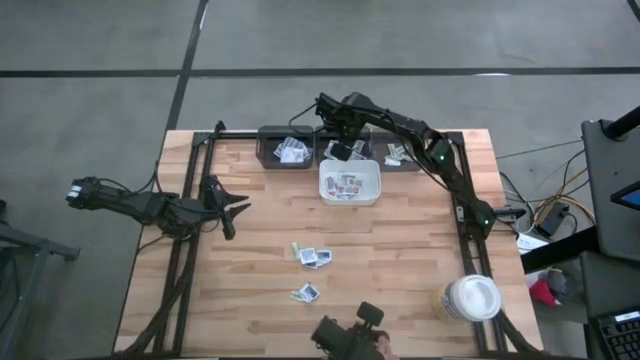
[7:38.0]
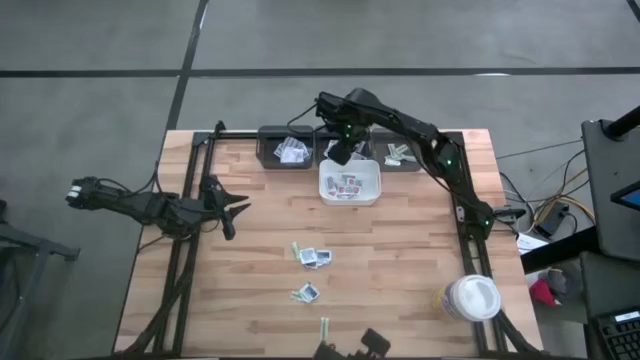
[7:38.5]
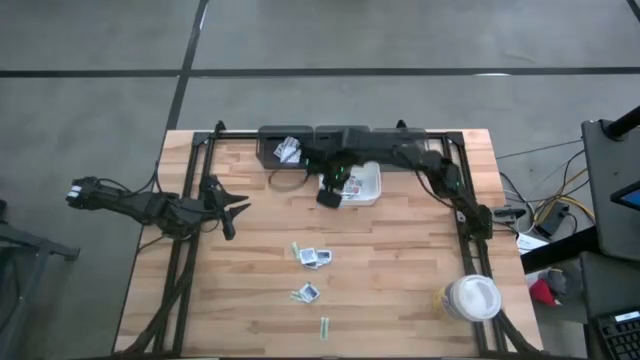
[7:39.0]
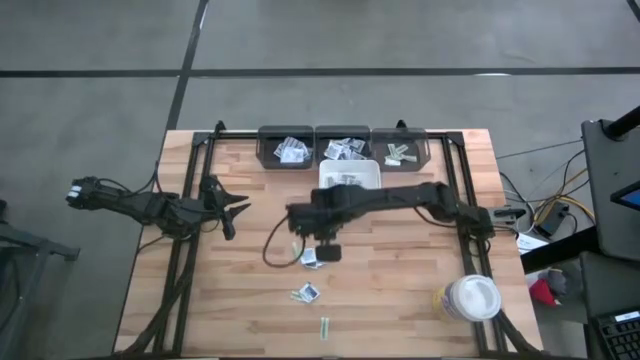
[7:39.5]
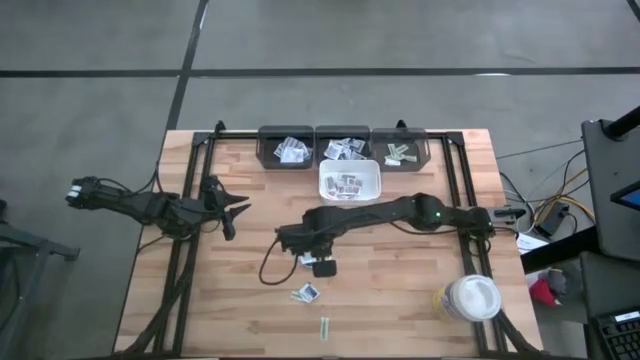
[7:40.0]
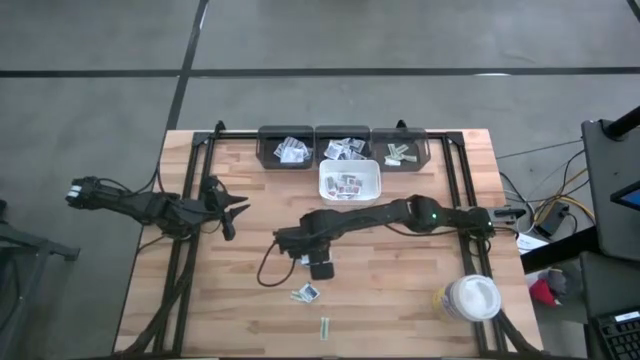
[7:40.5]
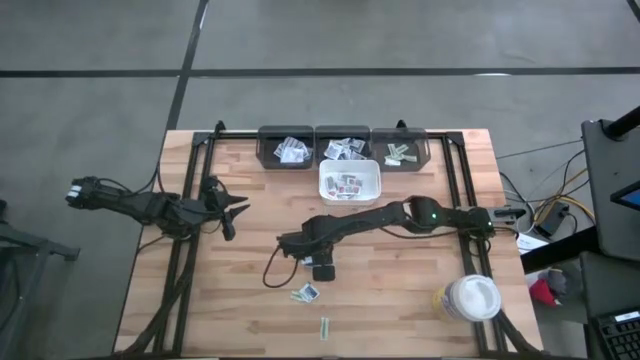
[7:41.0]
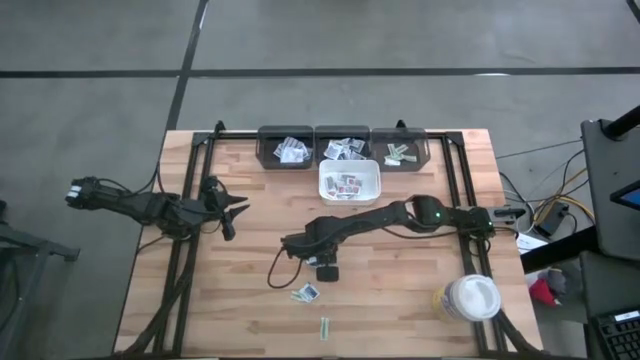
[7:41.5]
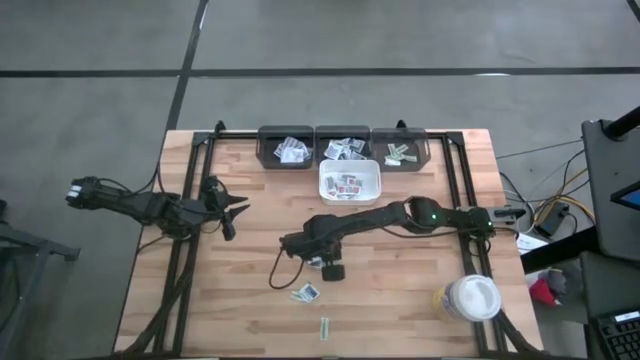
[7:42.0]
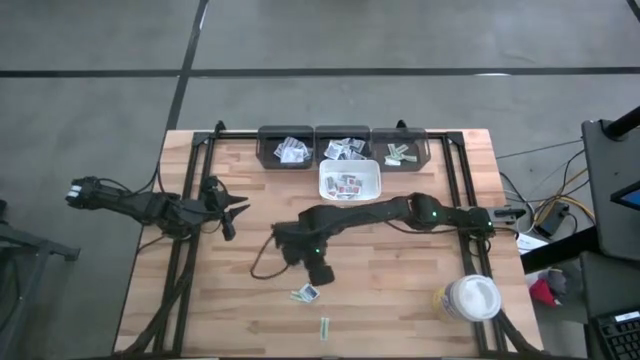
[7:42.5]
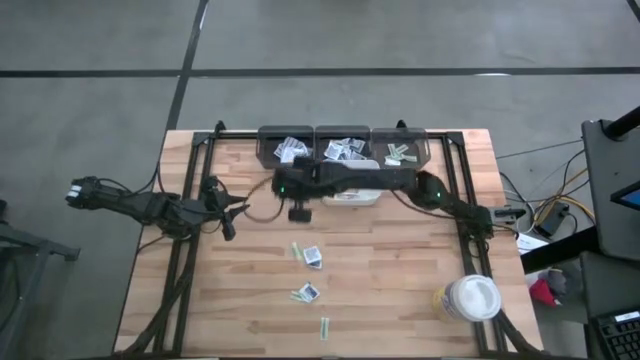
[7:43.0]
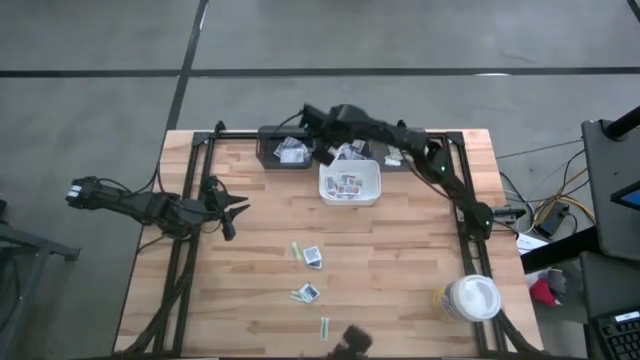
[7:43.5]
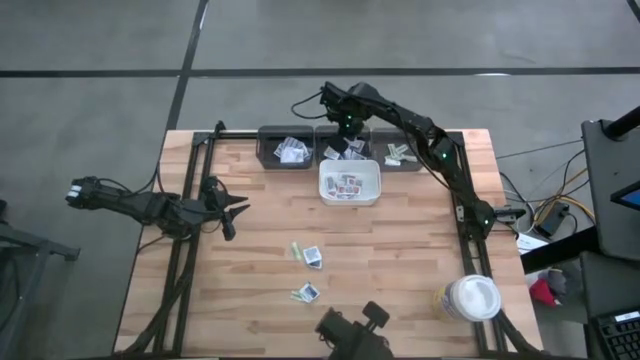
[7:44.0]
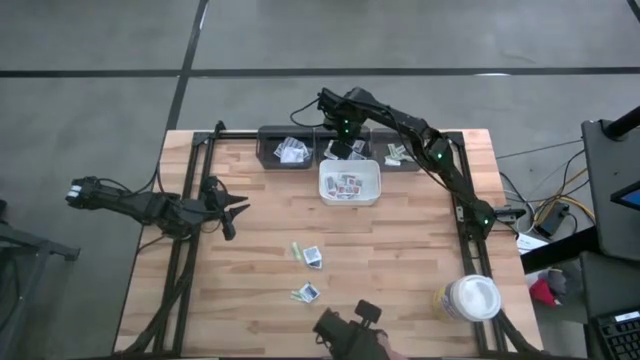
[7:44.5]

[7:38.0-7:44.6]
Task: Pick & Place First Aid Supplies
Put the blue alcohol pad into the middle gray bin

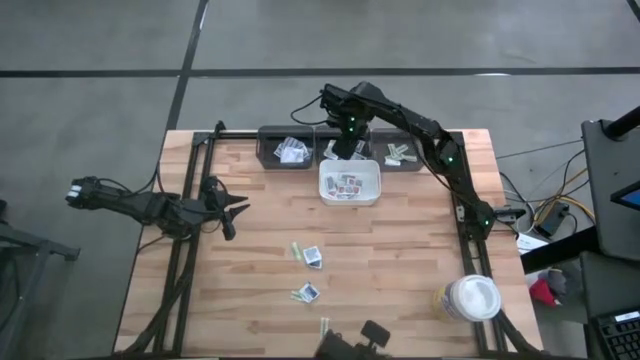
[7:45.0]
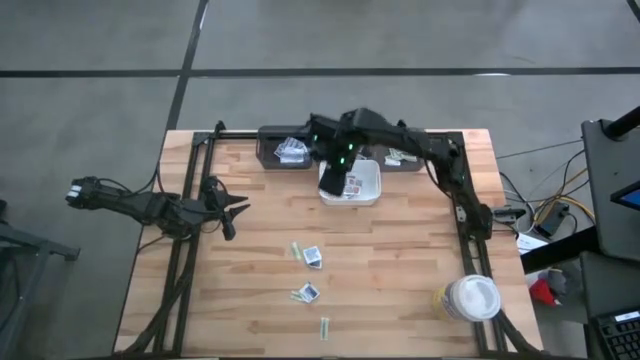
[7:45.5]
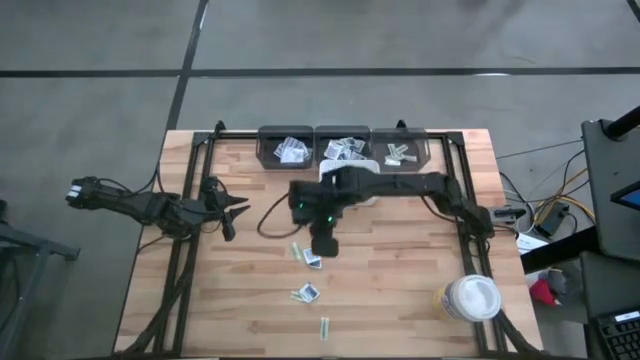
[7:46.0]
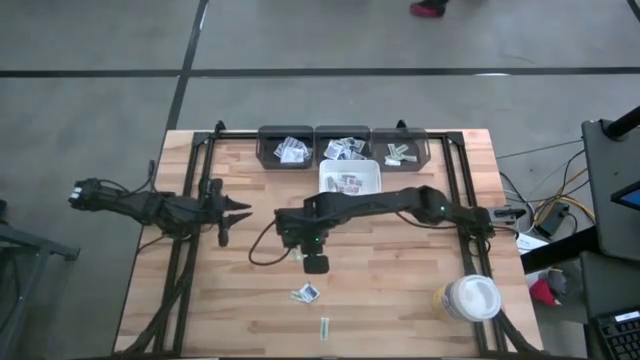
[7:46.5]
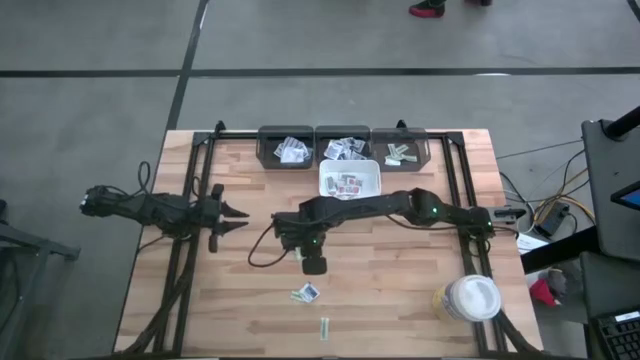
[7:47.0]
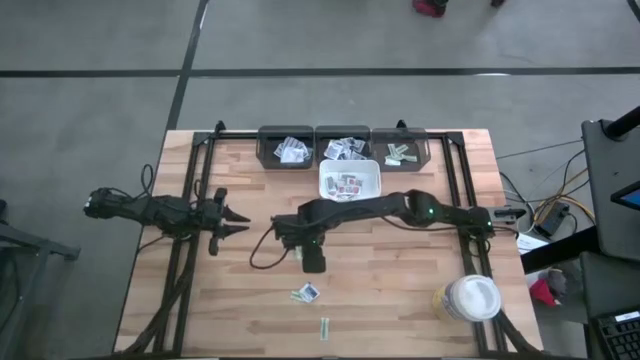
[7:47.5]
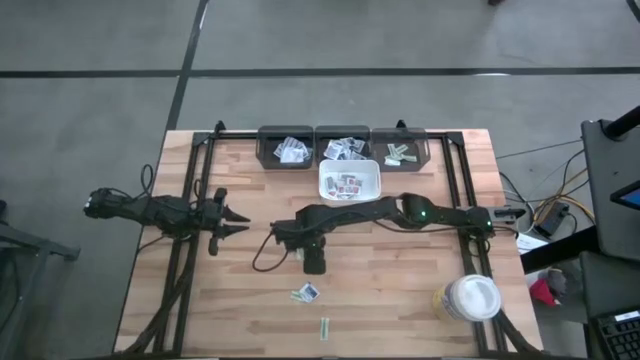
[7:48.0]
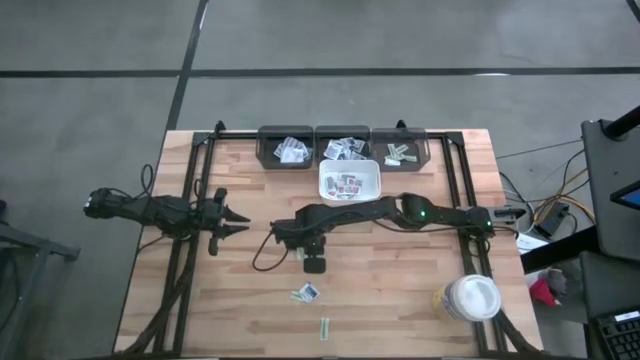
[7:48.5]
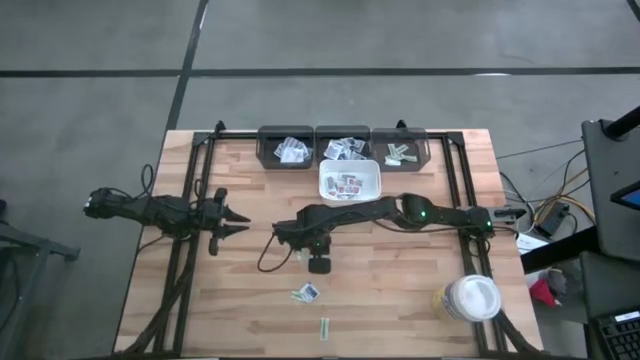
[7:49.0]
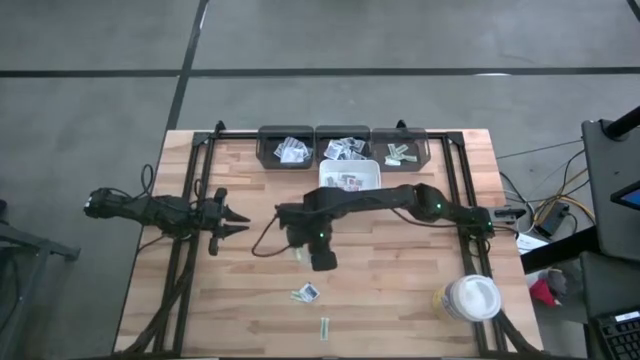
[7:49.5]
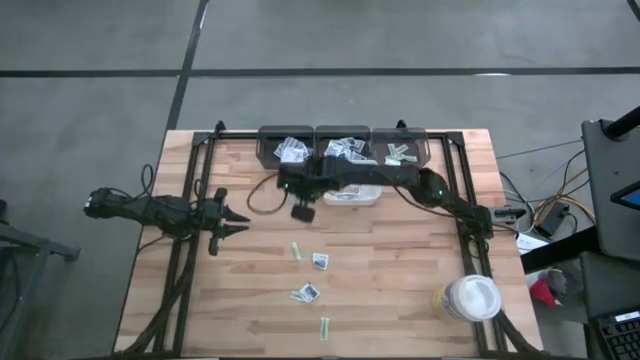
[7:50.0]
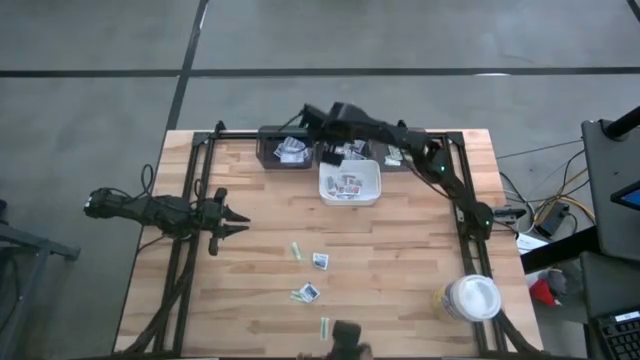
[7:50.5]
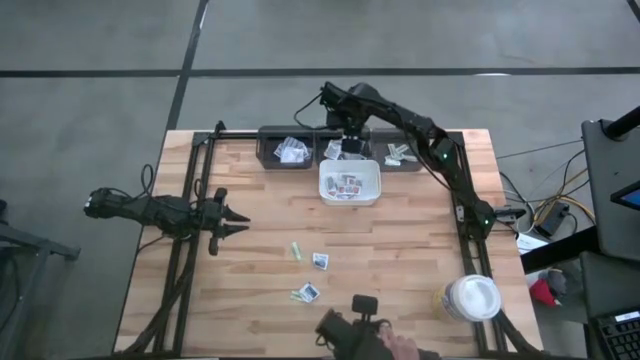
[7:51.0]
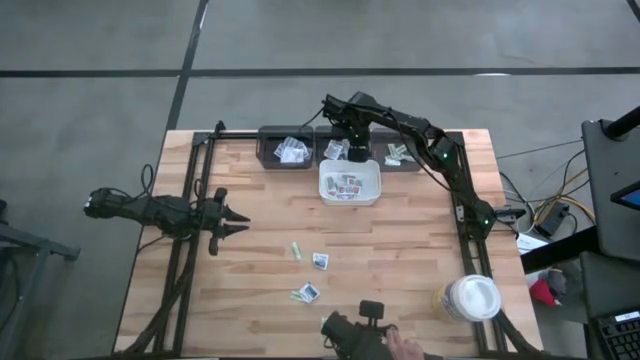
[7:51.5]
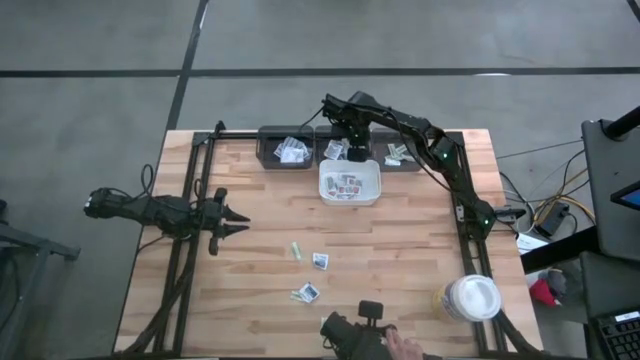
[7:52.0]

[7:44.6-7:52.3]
Put the top blue alcohol pad into the middle gray bin

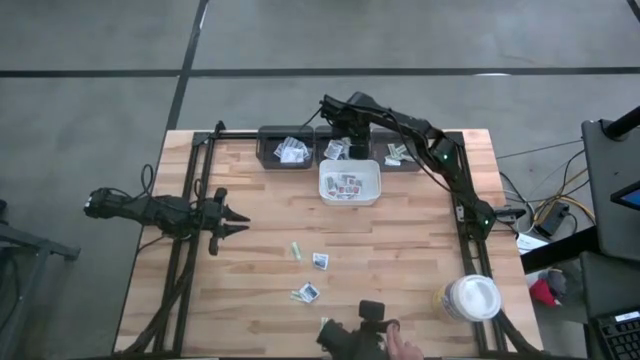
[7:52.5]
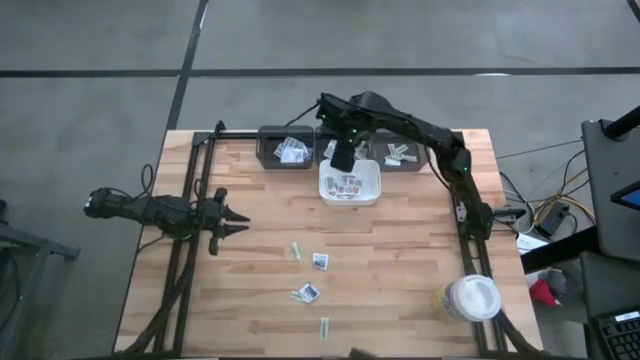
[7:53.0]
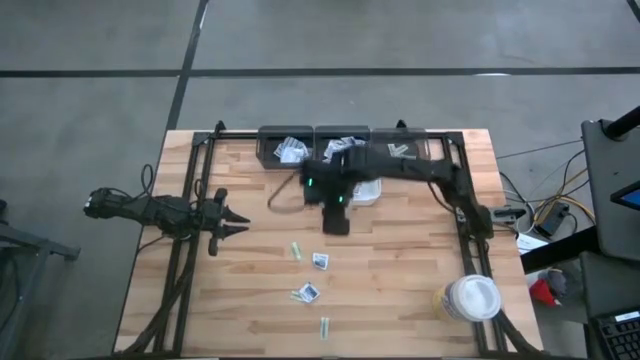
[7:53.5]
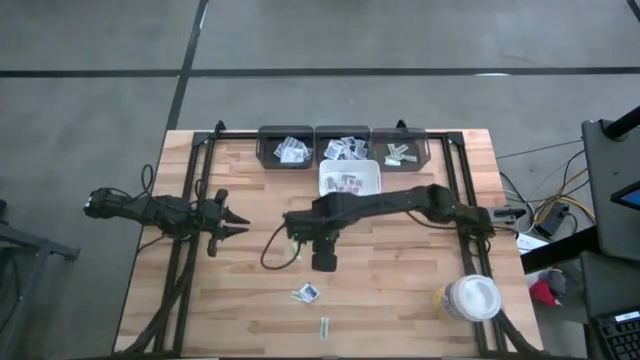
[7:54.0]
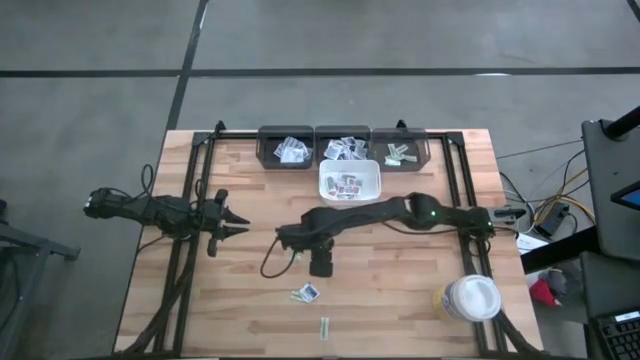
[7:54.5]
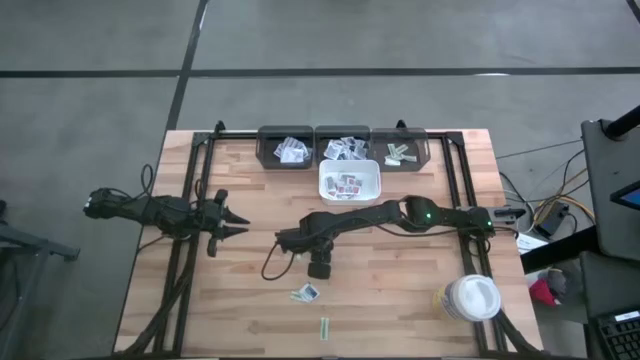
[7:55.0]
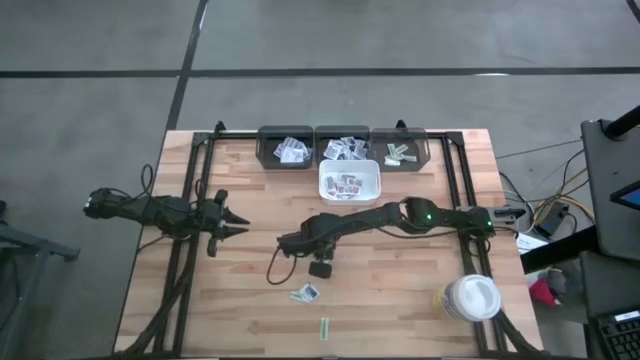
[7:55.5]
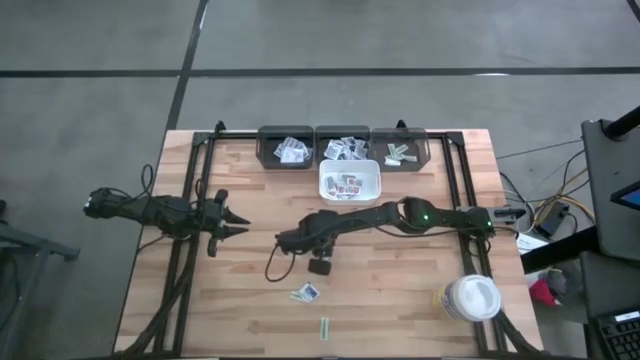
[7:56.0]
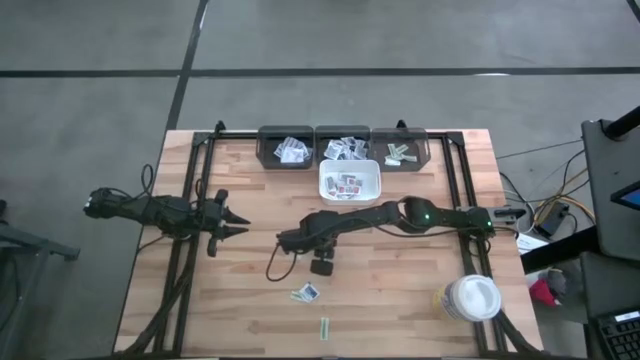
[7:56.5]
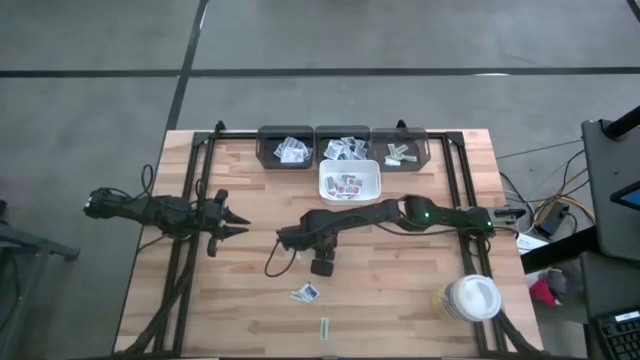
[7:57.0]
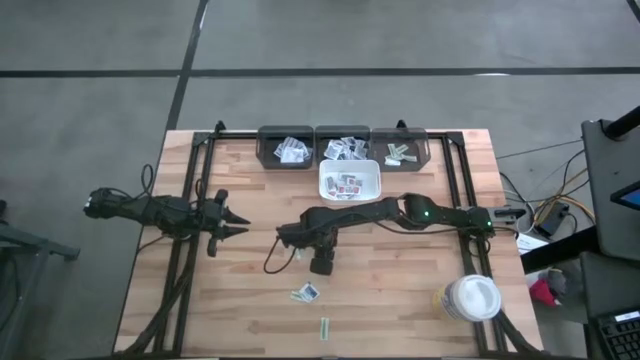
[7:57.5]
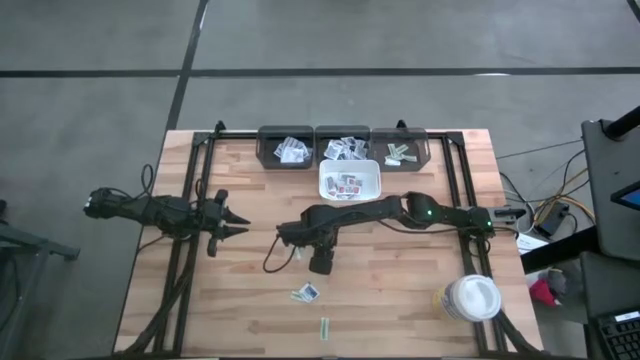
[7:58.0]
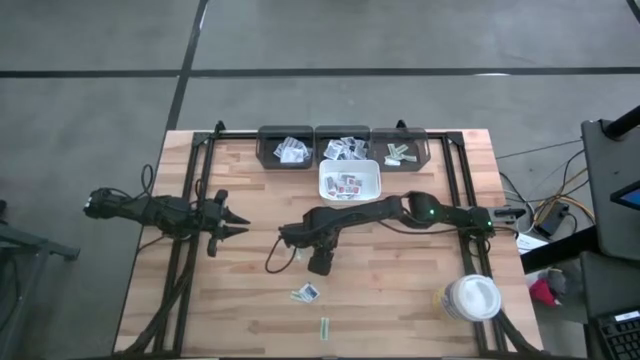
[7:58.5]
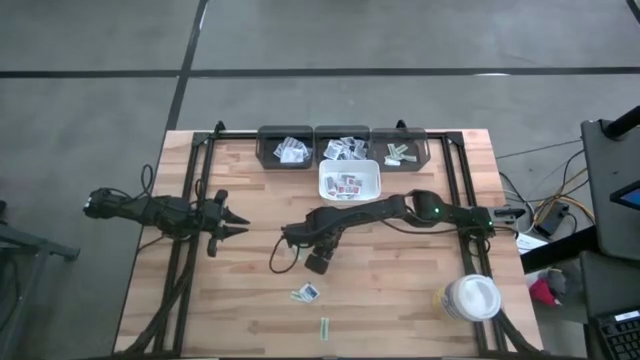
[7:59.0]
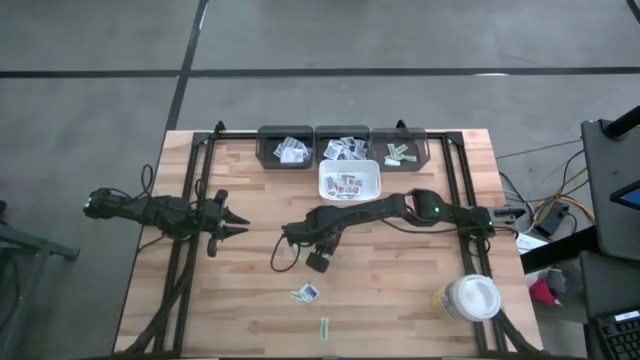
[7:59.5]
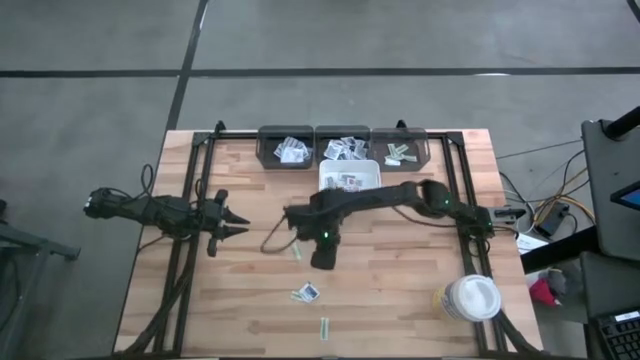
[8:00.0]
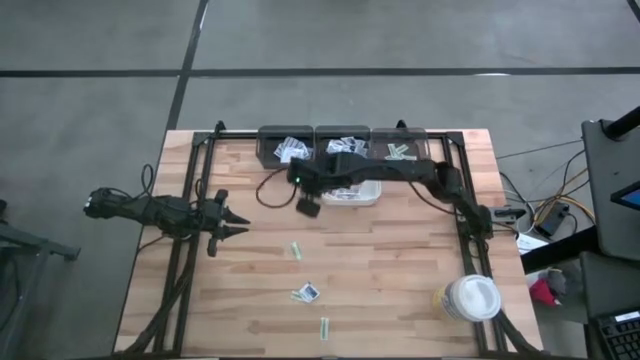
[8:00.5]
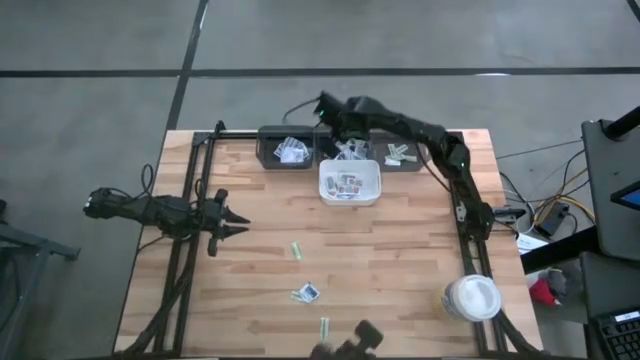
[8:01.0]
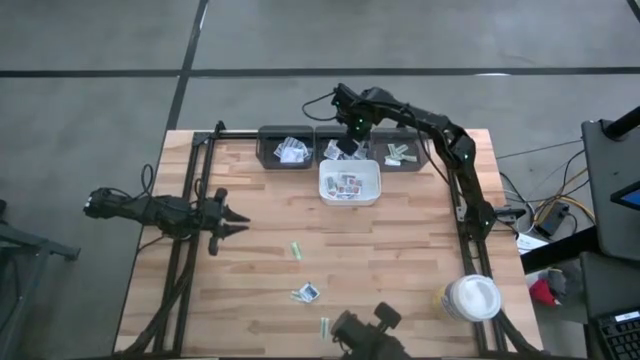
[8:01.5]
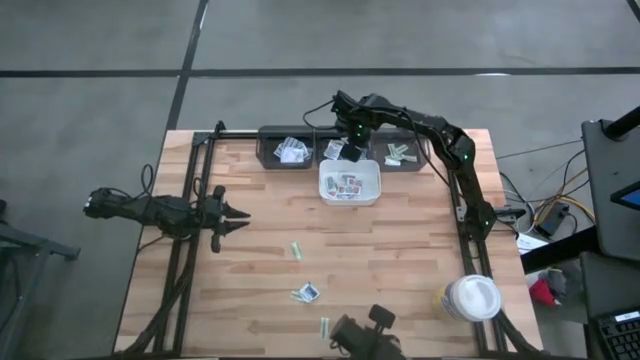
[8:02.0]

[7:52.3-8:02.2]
Put the top blue alcohol pad into the middle gray bin
